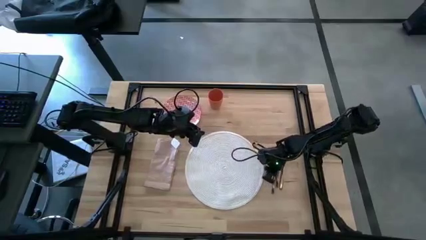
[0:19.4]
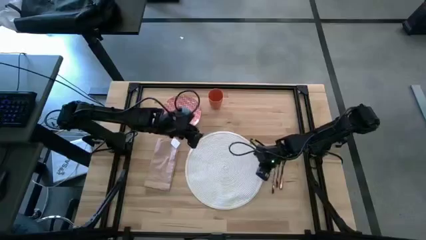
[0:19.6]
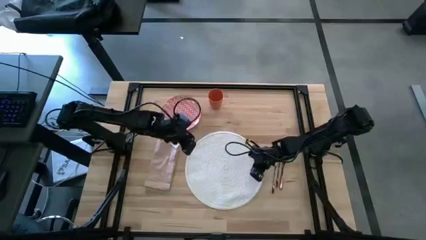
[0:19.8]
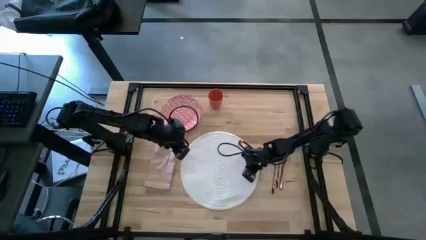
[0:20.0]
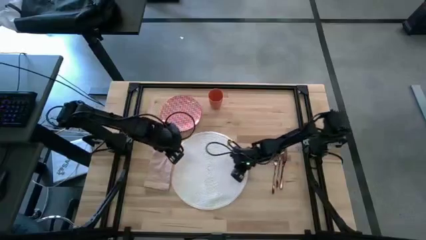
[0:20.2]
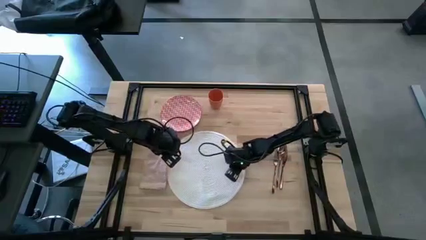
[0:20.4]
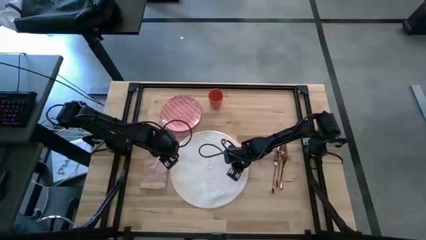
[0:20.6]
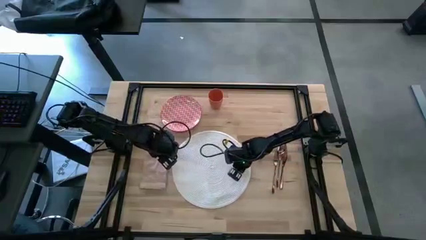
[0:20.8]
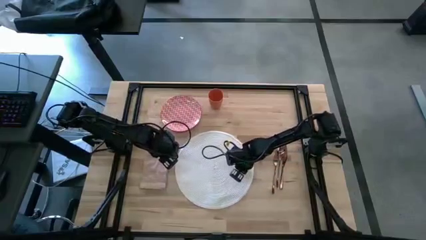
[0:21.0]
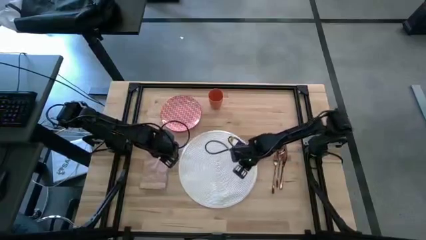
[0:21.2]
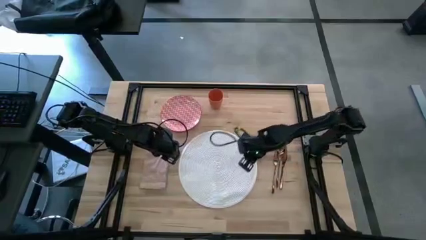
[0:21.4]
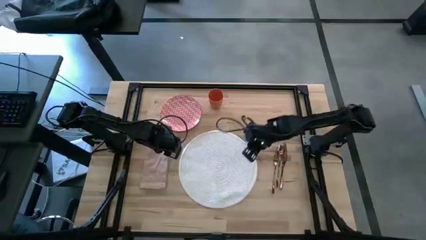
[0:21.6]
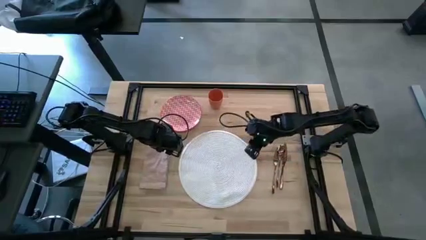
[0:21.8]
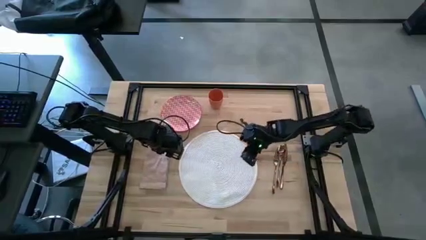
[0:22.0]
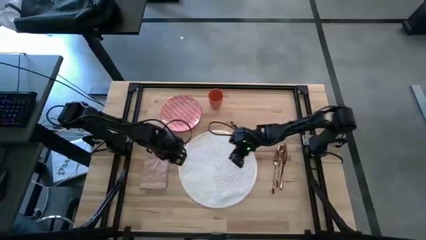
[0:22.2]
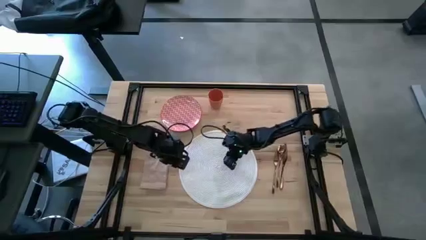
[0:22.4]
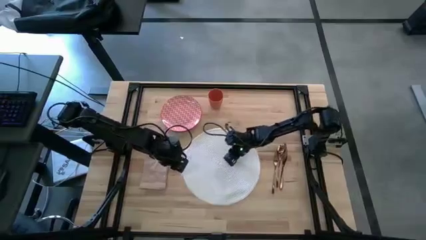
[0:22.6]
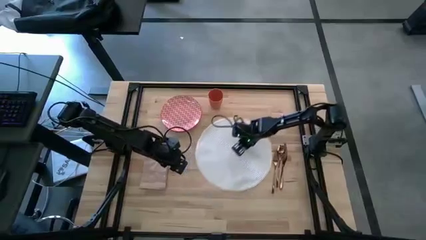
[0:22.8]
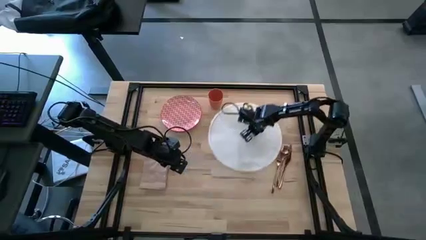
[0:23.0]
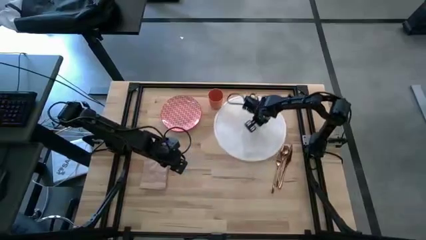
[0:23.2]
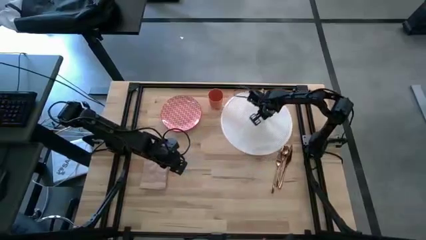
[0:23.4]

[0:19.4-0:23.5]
Task: Set table place
Move the table mat to the top right of the table

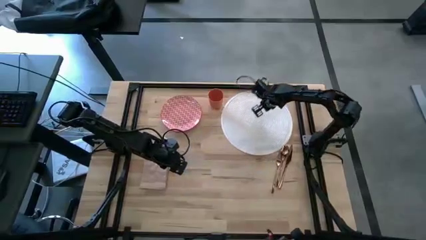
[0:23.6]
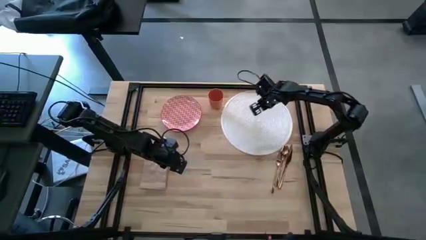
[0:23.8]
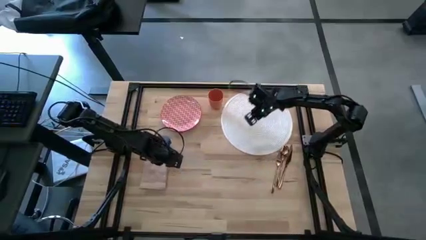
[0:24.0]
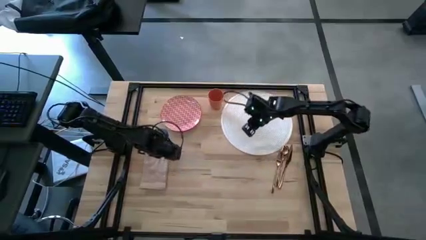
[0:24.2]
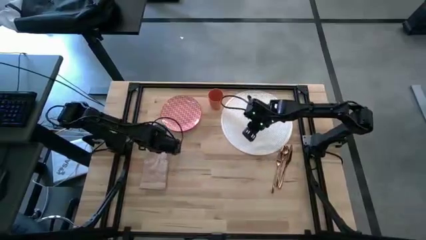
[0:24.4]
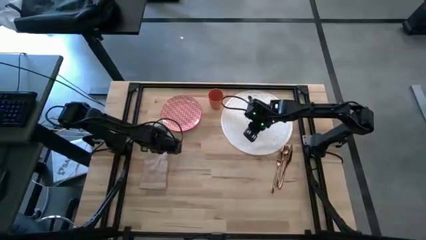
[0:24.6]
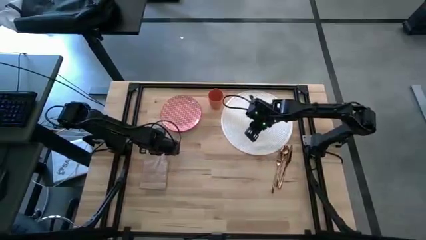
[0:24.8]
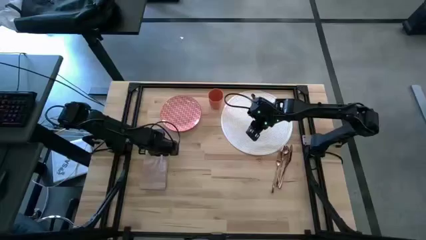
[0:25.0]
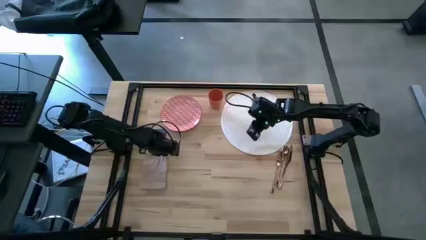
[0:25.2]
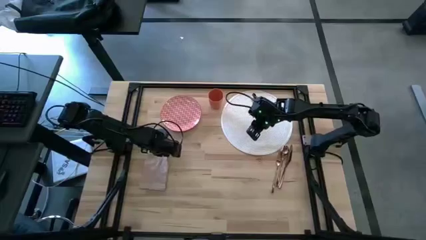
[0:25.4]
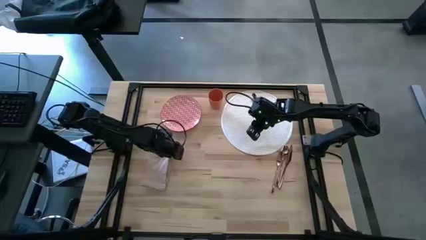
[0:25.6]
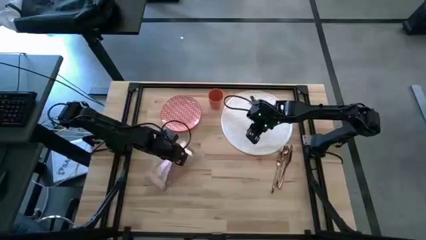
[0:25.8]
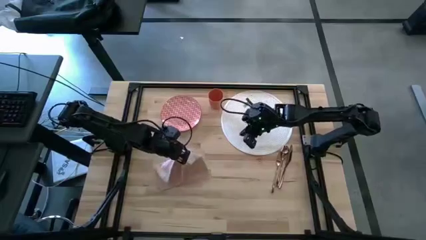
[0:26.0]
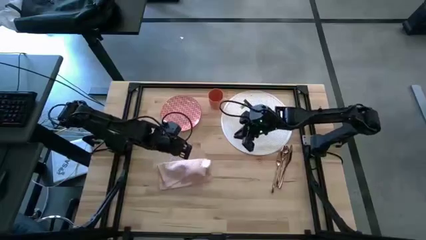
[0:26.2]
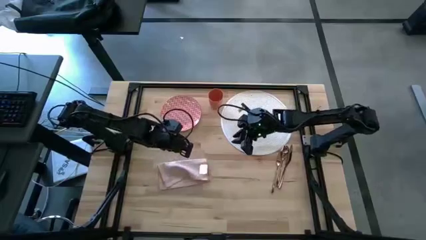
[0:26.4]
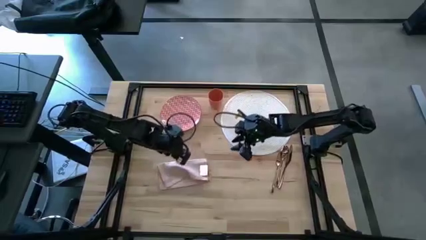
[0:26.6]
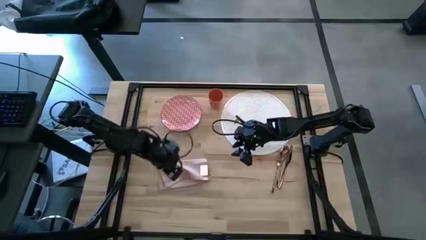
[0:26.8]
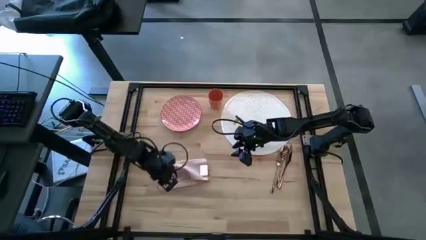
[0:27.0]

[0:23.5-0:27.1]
Fold the pink napkin

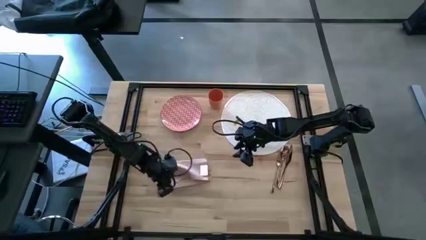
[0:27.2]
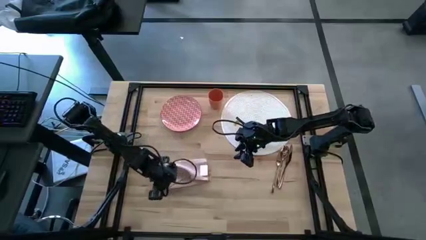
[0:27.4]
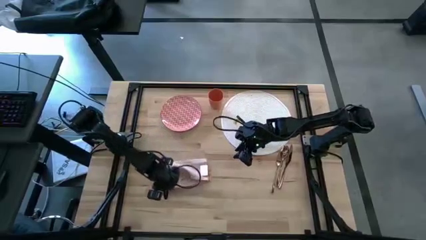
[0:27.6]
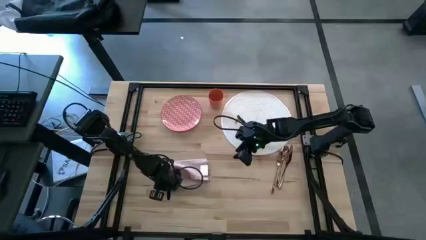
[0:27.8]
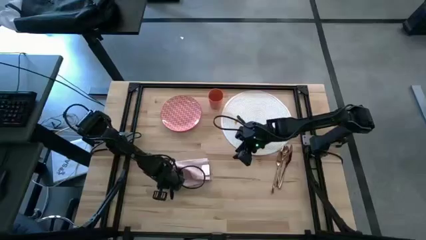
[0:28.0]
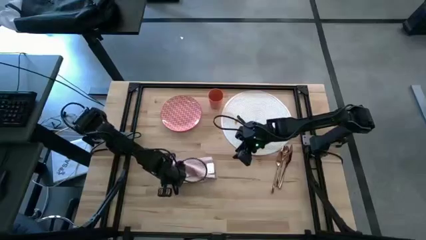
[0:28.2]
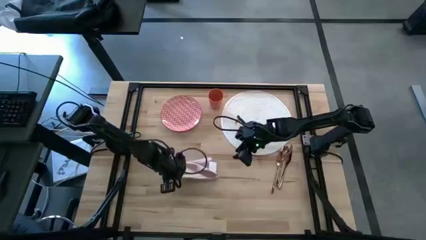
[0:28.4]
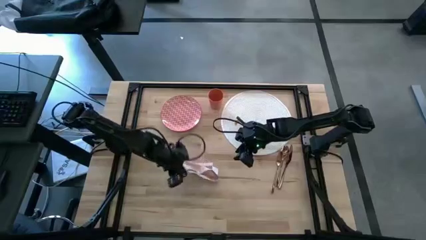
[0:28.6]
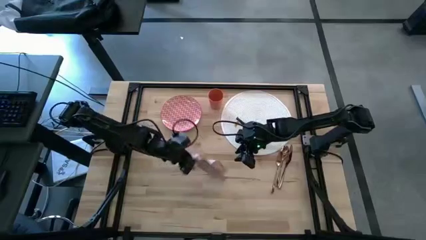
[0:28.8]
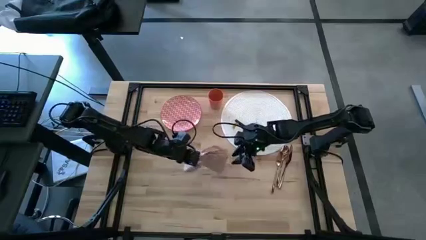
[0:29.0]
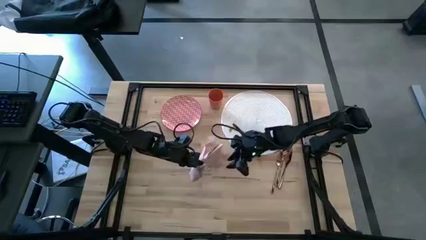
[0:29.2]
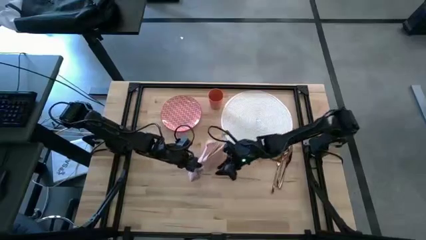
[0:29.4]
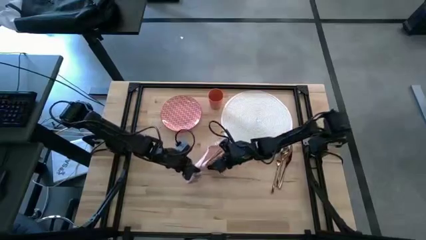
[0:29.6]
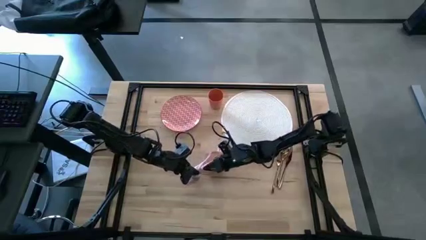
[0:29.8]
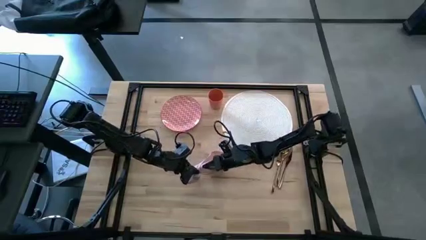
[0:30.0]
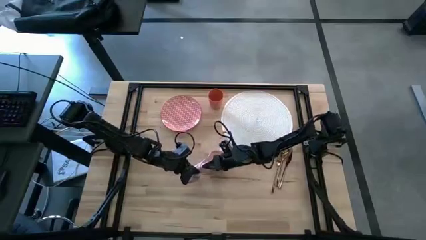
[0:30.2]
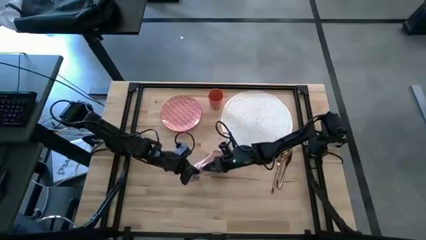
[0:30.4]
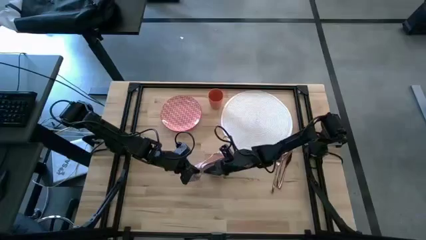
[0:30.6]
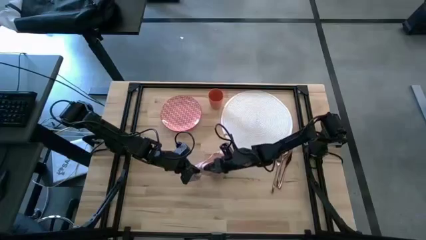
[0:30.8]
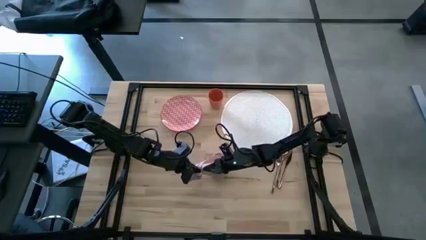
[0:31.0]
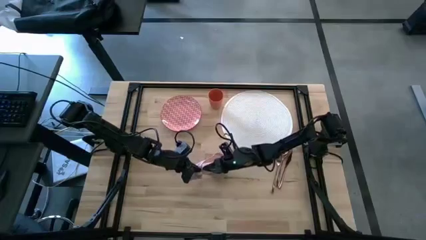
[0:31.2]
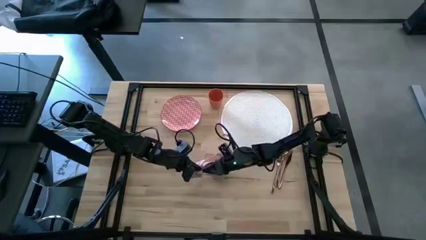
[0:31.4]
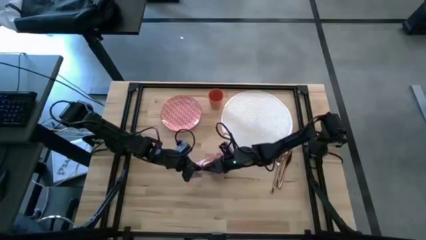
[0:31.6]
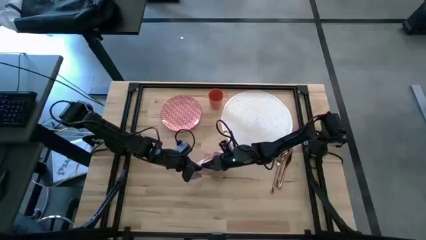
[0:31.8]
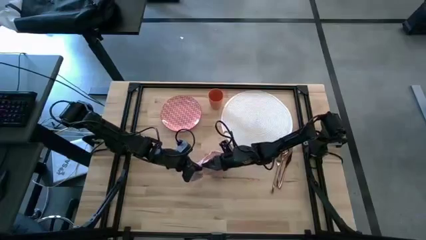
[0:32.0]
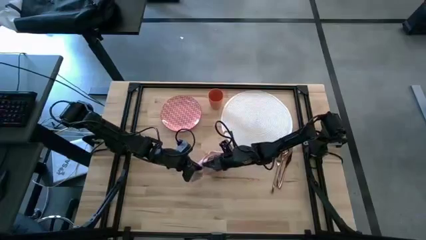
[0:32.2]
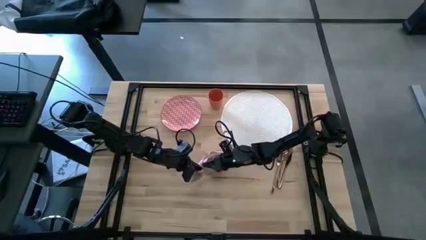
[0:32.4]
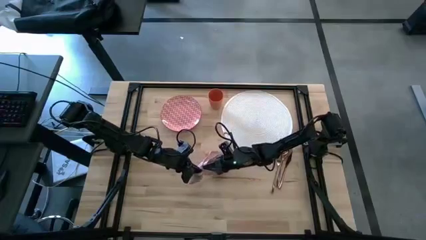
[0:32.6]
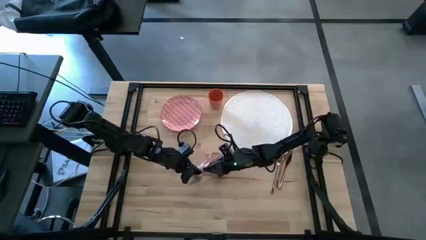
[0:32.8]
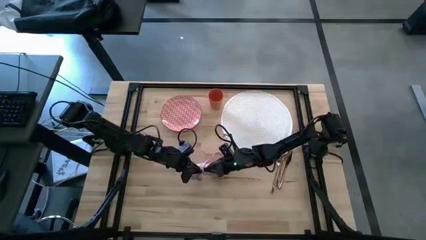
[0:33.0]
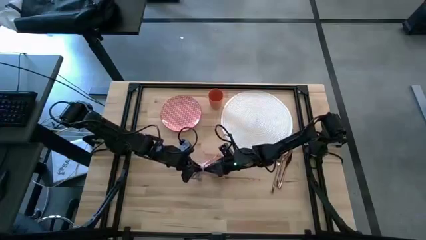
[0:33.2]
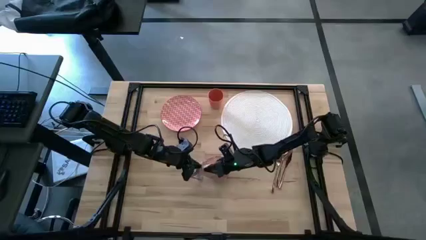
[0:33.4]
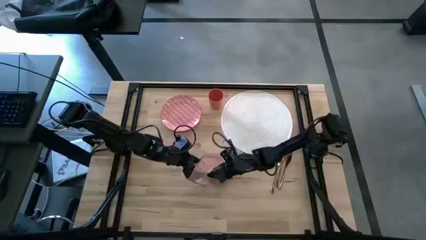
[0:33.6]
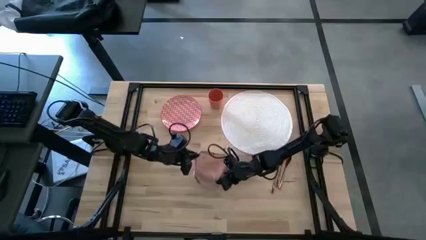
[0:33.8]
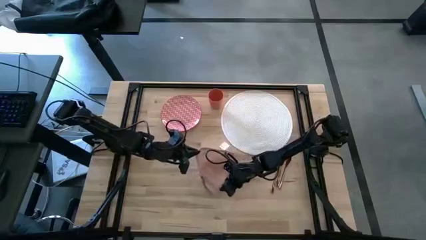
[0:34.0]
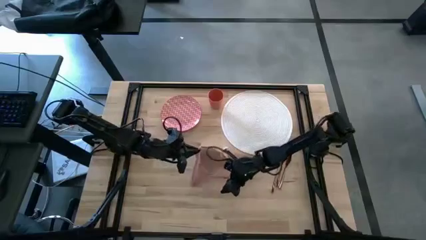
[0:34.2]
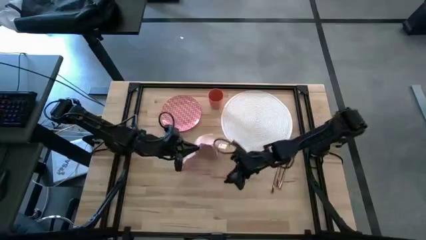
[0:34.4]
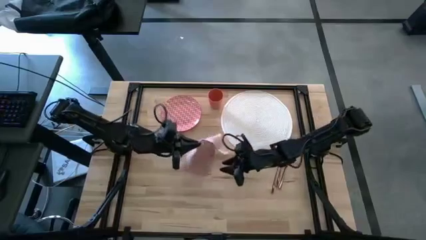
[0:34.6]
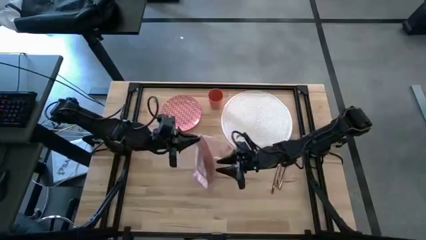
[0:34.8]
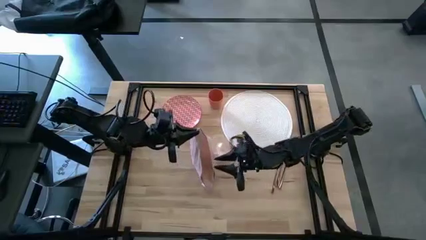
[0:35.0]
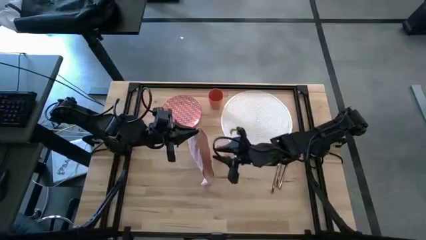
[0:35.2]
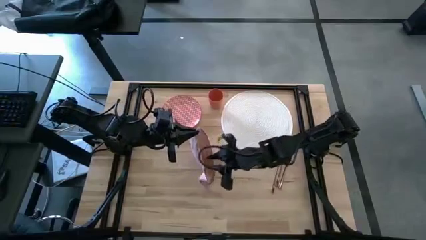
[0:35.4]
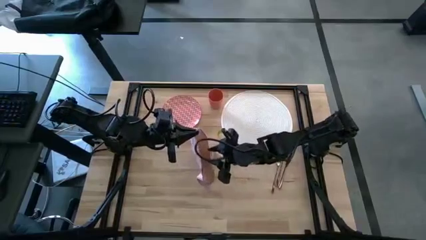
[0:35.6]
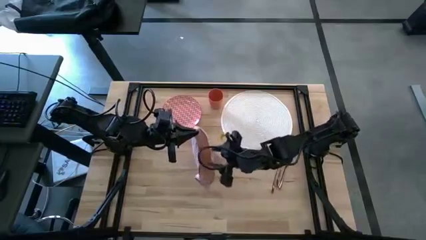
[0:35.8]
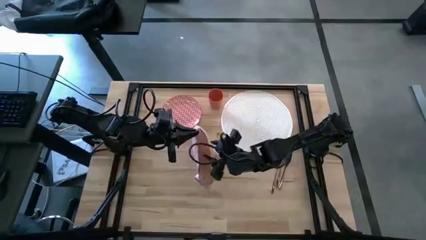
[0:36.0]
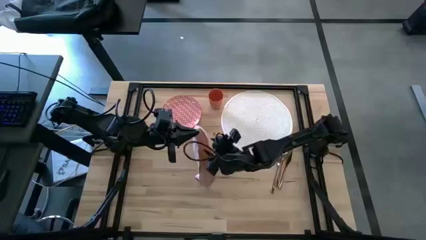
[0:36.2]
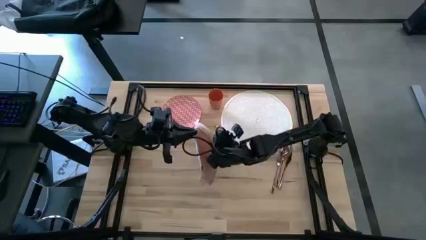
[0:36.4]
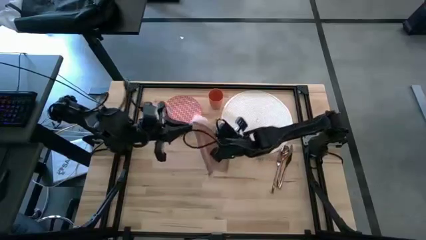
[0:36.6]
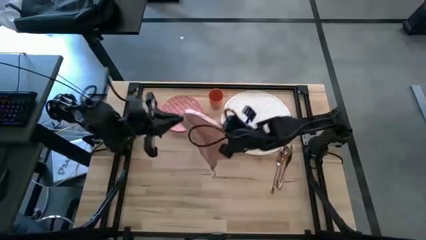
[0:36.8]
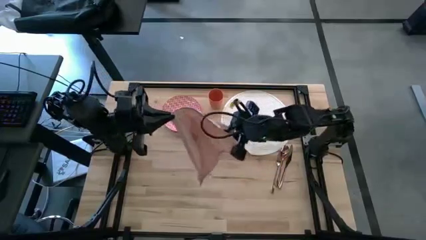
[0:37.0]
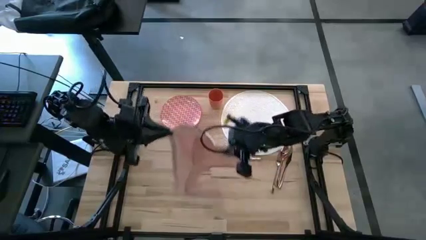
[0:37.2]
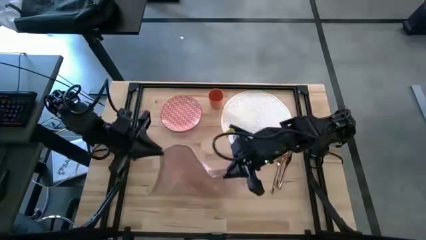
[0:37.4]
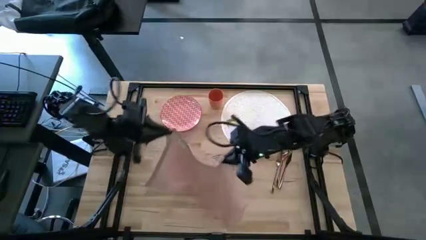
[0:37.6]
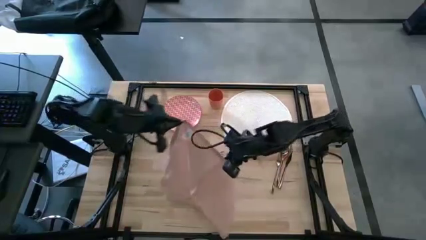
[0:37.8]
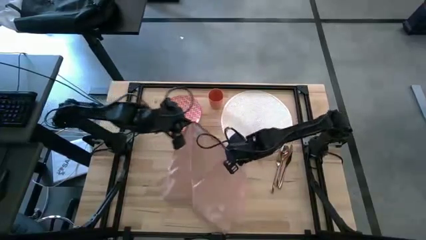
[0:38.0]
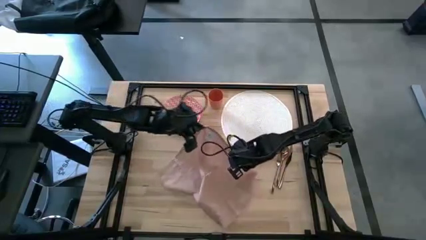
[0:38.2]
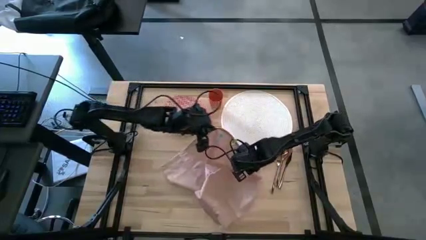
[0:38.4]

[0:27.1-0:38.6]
Fold the pink napkin
